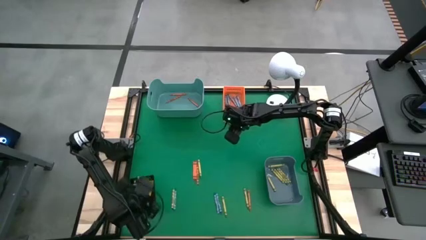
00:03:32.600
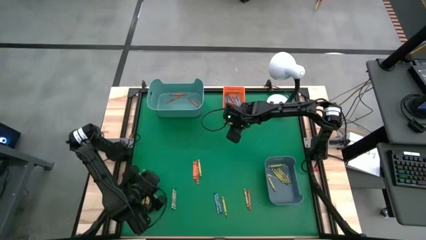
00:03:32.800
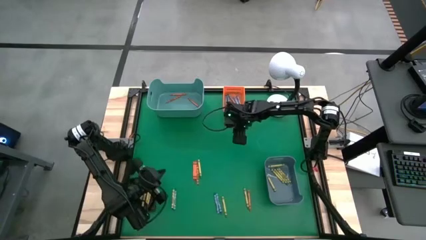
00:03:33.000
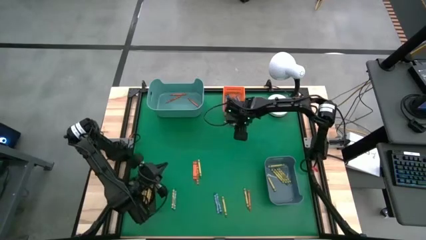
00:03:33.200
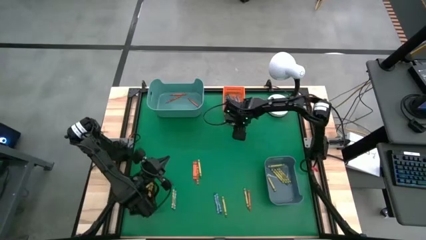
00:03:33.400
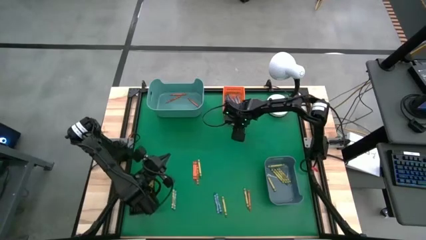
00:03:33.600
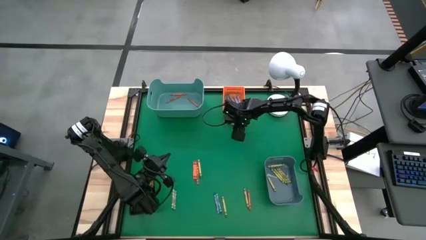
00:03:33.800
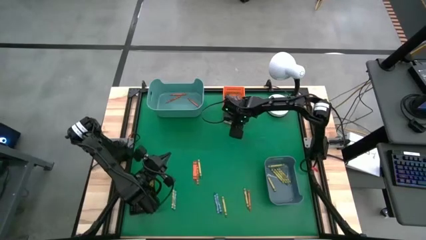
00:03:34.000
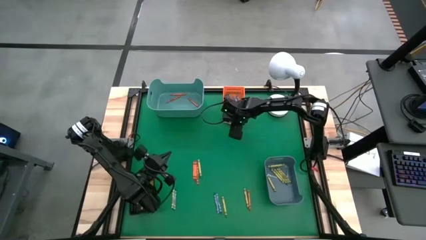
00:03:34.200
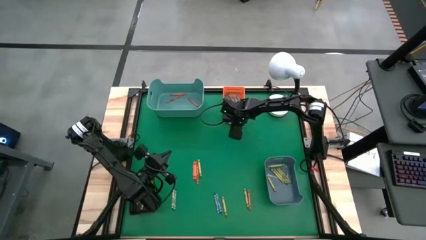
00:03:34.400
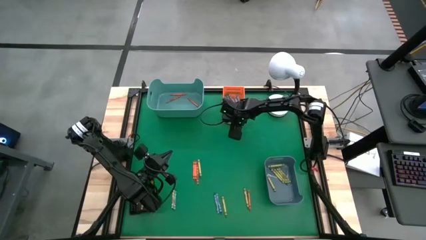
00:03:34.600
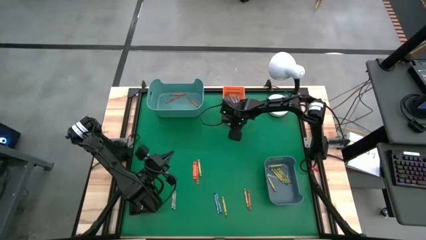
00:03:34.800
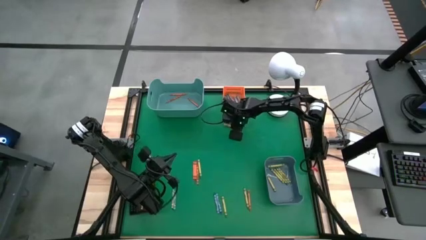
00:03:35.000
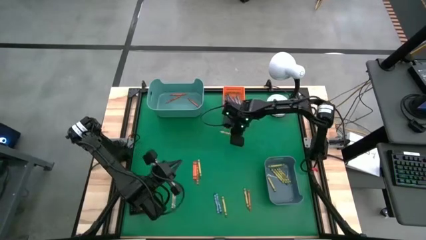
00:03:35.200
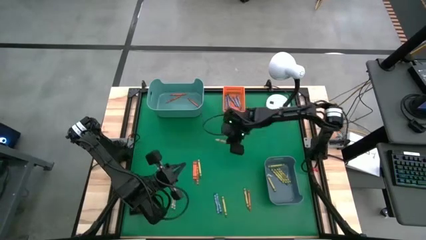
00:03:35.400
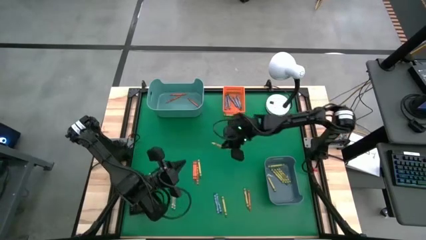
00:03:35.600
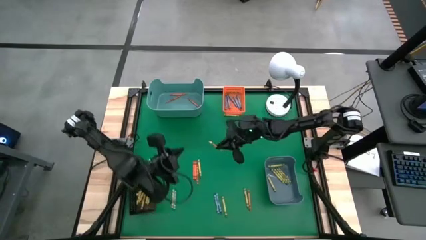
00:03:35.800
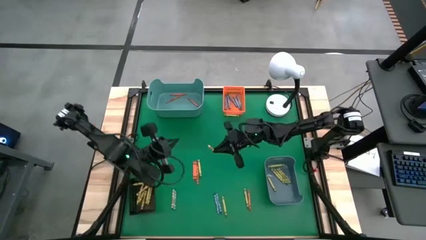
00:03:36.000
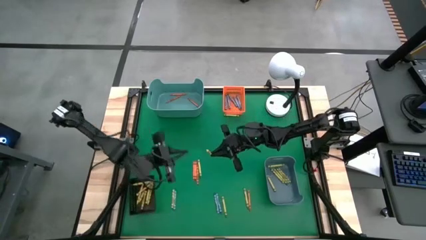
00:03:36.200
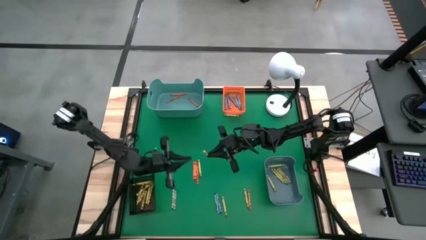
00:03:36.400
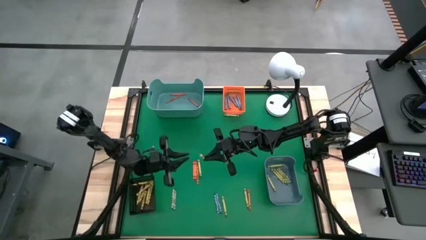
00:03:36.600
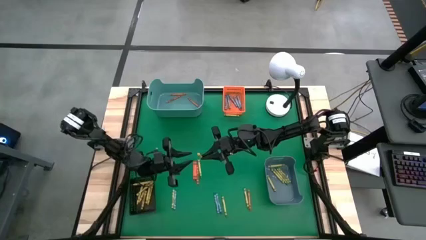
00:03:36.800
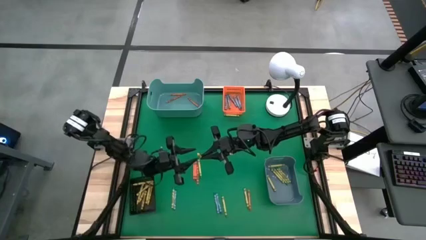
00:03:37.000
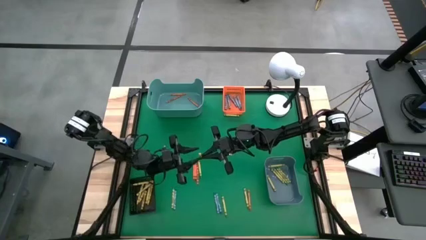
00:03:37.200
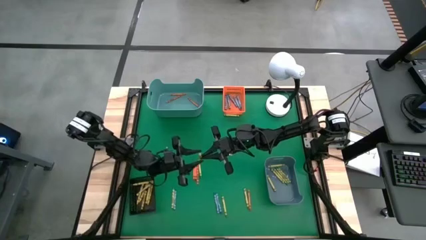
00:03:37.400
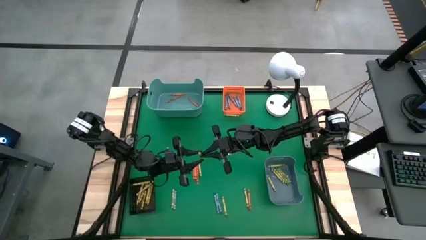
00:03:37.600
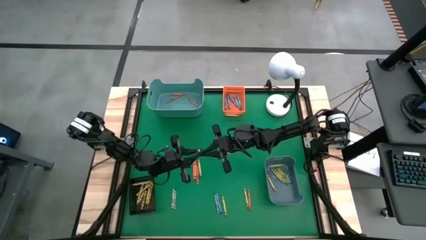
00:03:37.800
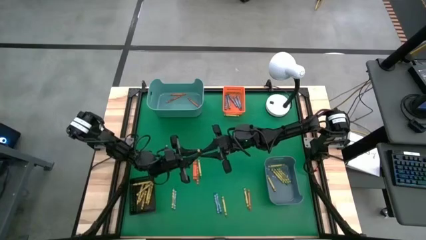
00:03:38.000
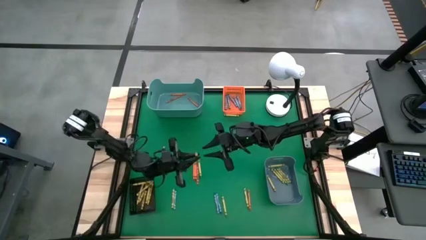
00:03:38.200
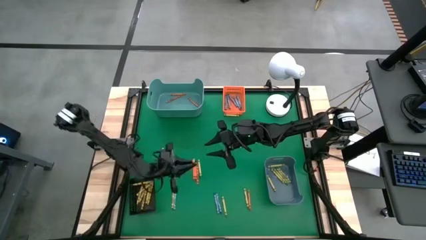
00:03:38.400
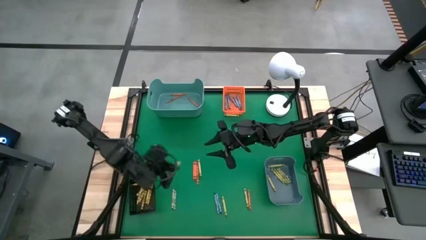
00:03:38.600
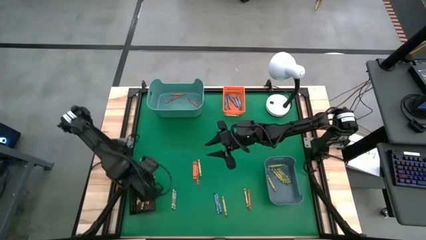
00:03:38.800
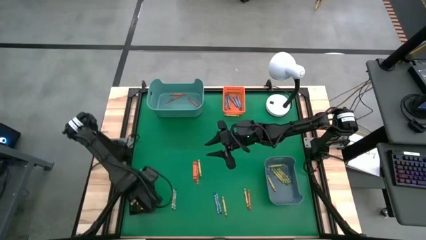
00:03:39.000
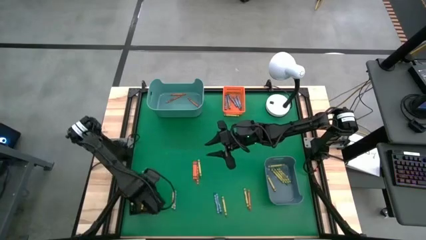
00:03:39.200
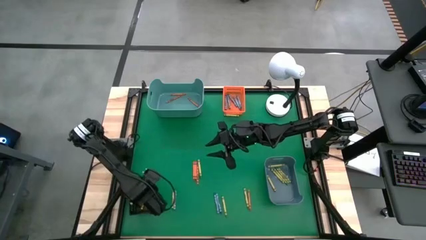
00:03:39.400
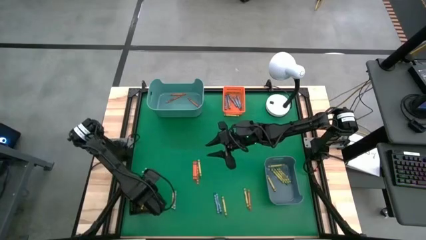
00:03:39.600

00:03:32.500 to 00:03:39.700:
Task: Sort crayons
Put the yellow crayon into the black bin

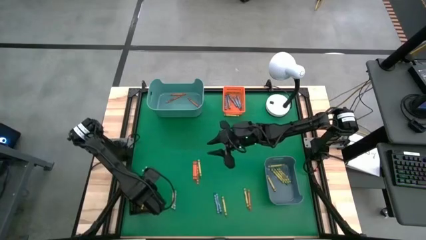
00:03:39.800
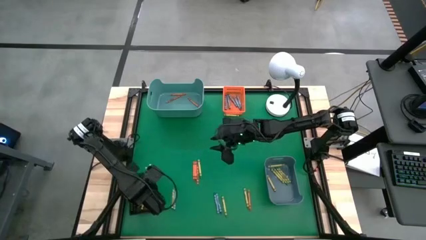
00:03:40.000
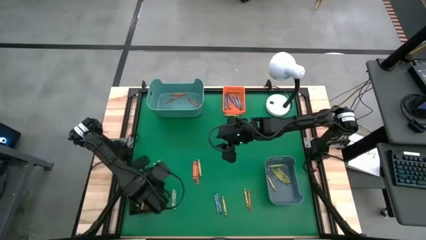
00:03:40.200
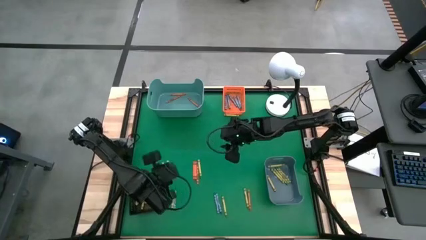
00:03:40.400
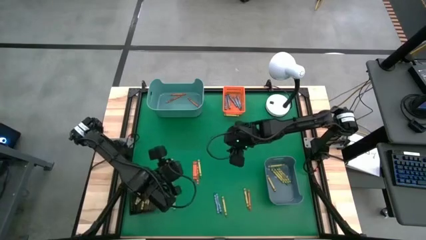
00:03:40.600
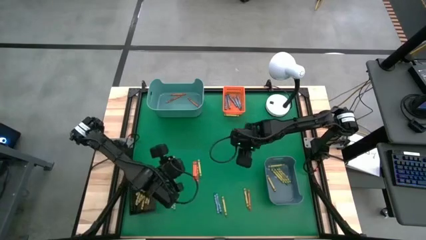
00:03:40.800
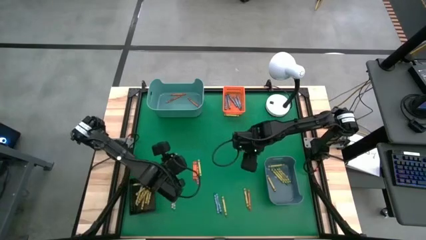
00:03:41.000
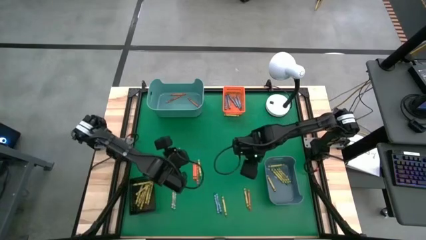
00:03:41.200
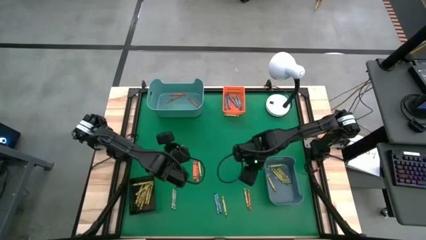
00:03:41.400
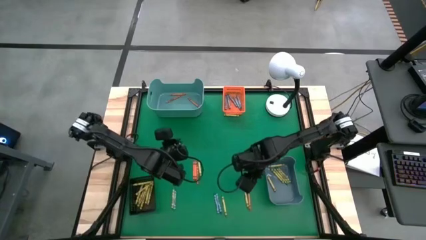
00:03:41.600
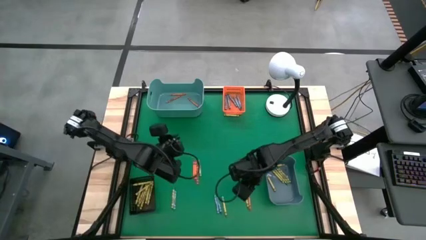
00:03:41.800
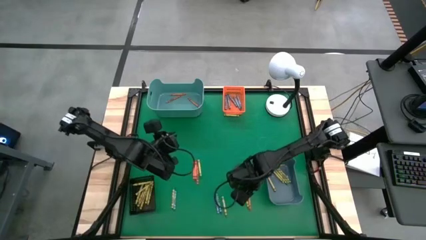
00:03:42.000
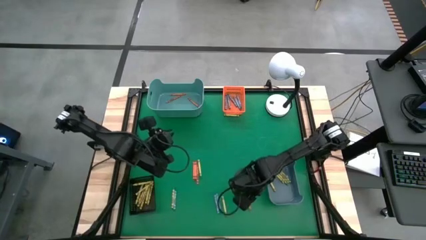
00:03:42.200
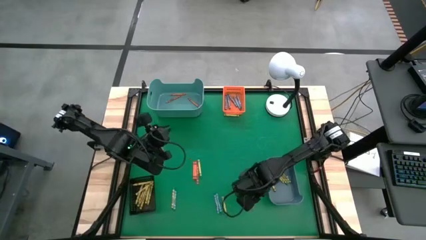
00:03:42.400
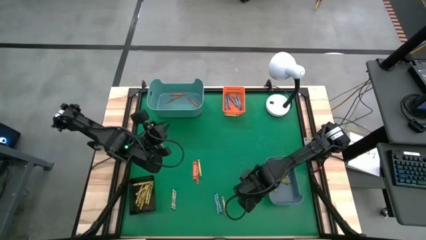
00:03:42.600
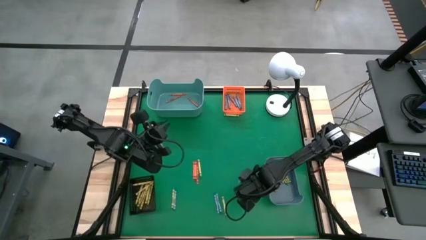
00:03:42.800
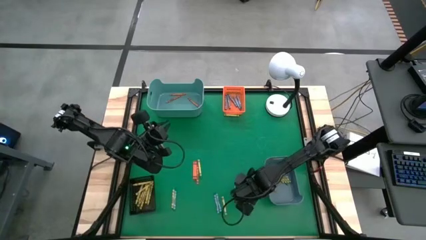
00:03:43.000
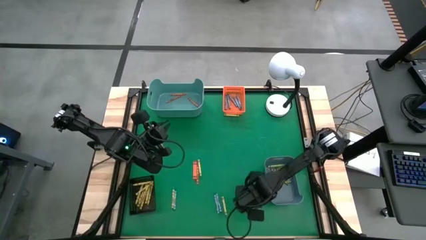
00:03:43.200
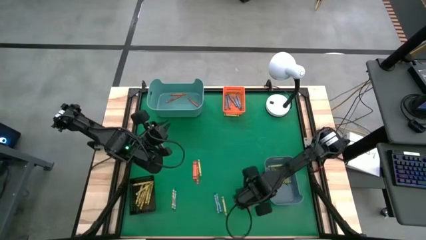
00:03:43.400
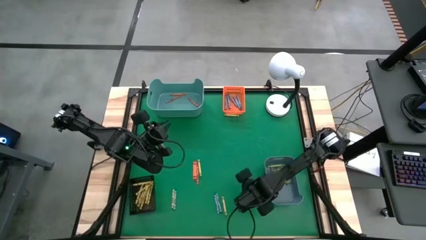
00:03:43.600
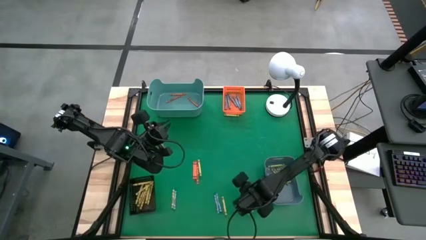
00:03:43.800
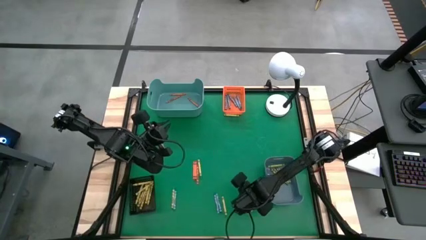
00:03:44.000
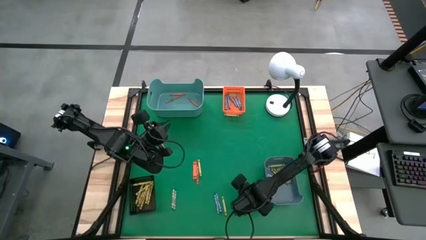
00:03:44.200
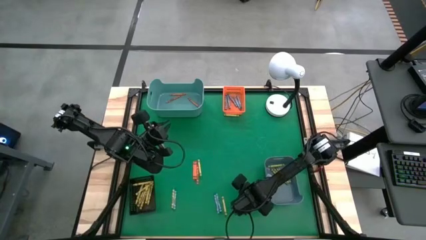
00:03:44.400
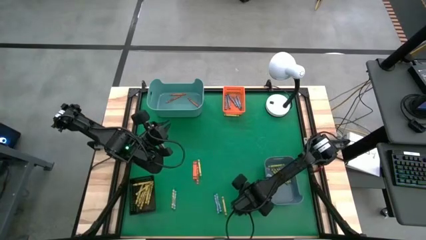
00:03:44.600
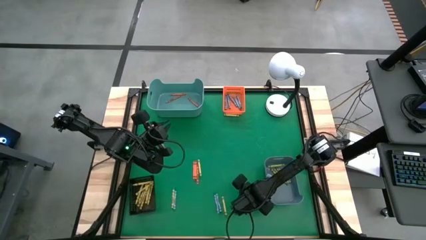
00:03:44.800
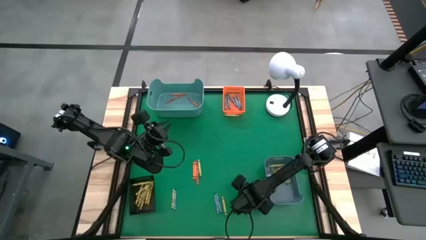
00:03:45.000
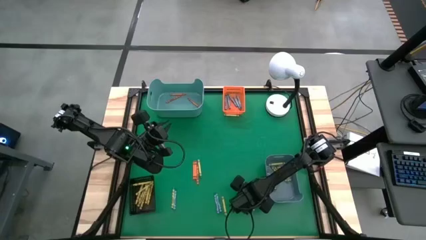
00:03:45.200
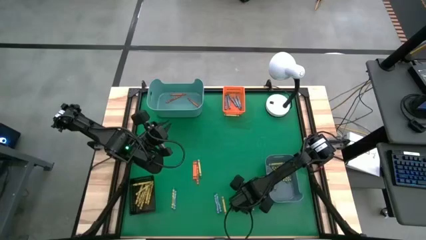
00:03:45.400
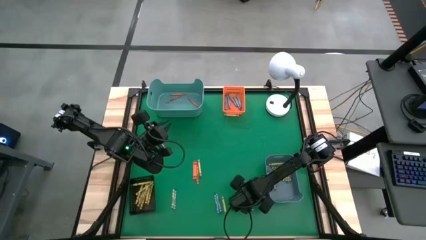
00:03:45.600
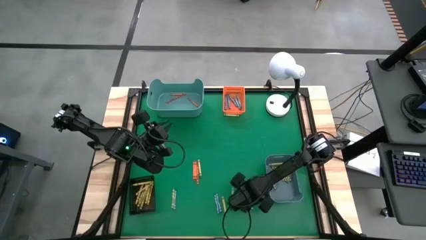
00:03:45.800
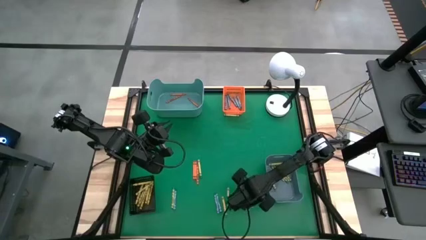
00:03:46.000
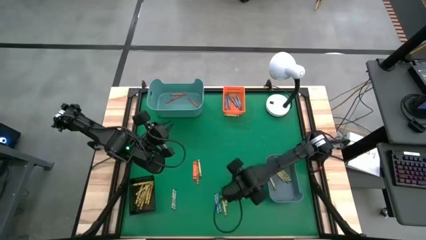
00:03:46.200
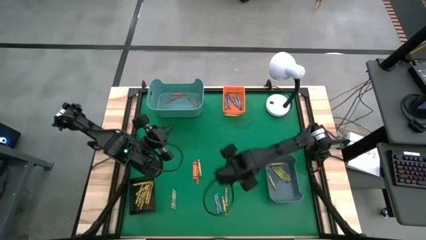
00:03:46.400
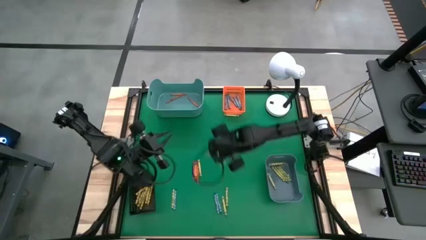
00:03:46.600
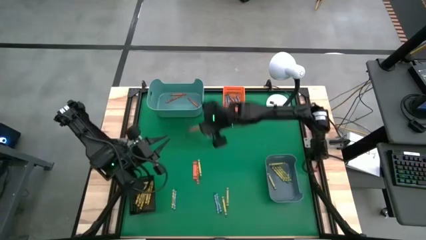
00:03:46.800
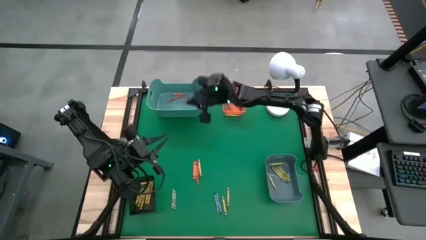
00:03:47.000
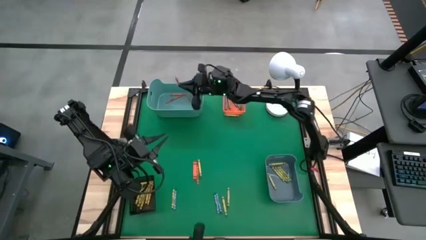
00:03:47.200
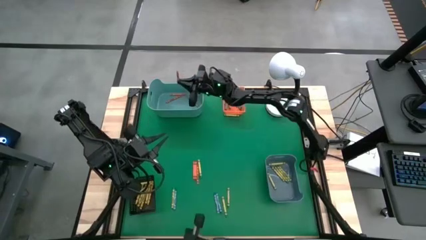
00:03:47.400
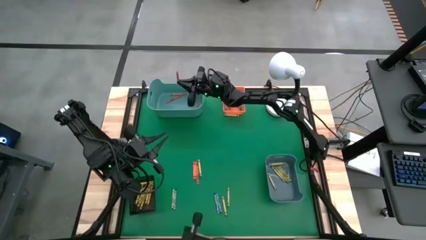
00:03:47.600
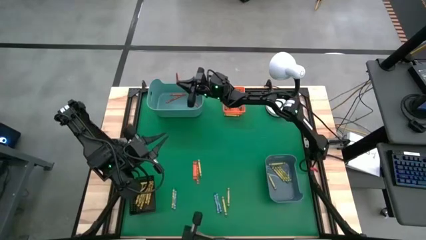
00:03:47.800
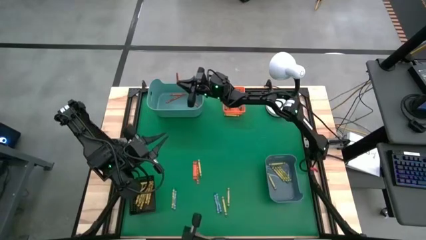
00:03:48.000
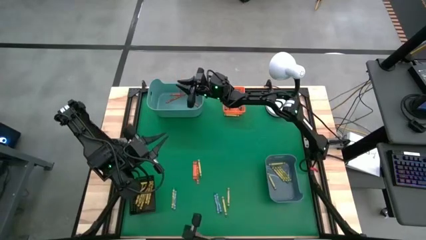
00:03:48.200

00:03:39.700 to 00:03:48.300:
Put the orange crayon into the green bin
